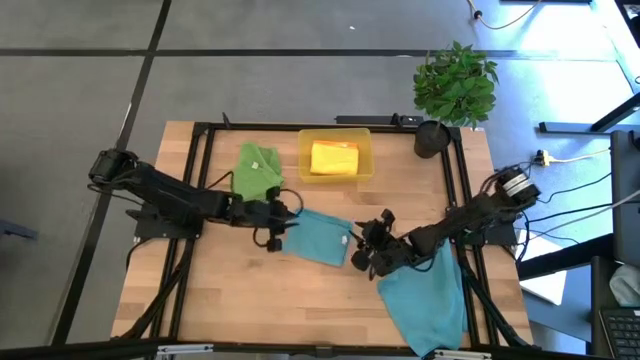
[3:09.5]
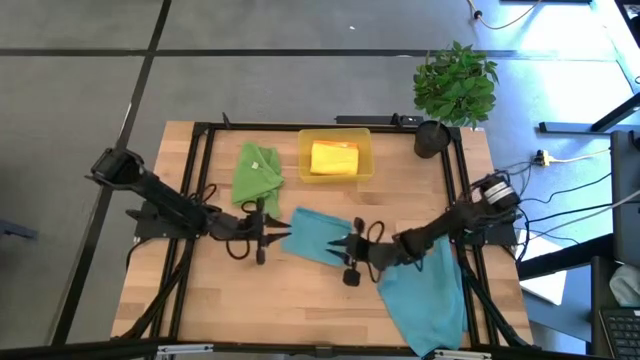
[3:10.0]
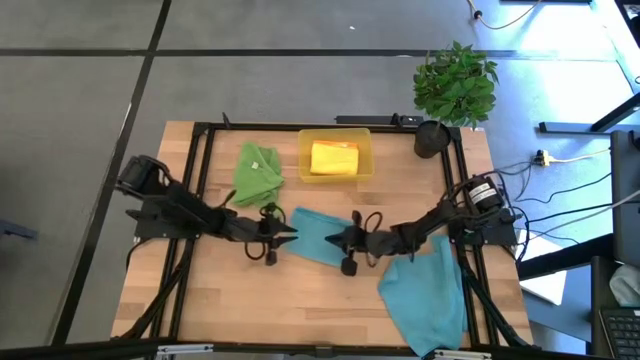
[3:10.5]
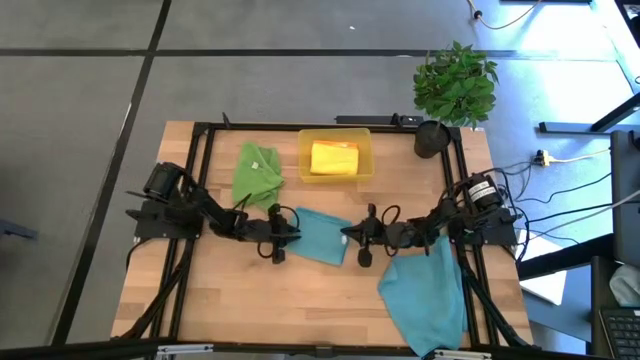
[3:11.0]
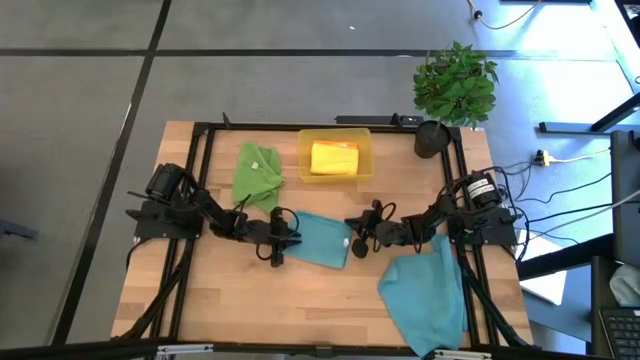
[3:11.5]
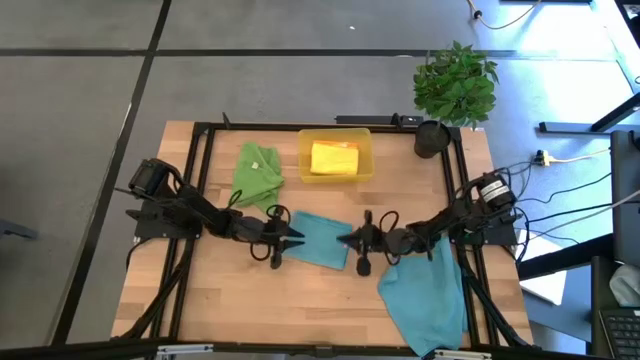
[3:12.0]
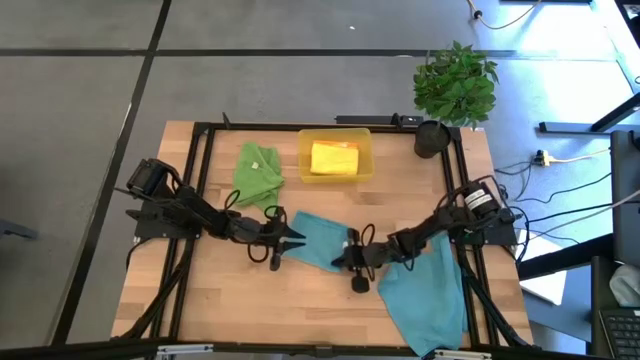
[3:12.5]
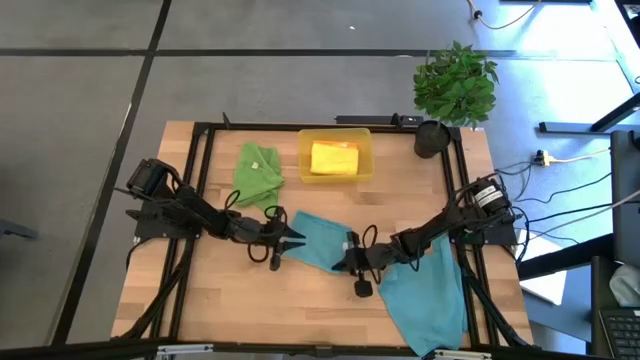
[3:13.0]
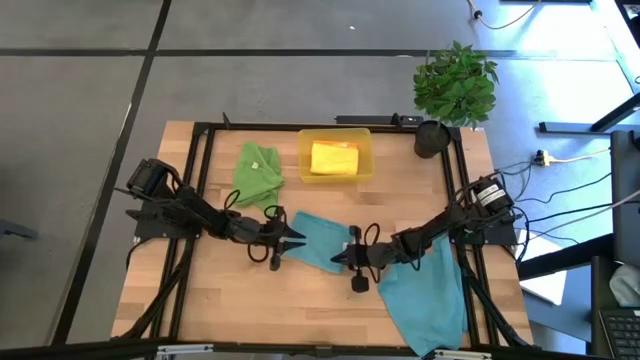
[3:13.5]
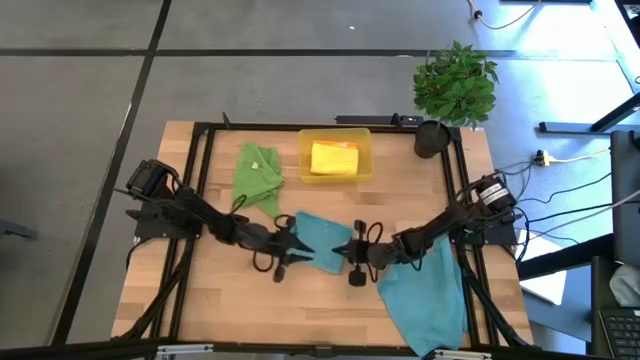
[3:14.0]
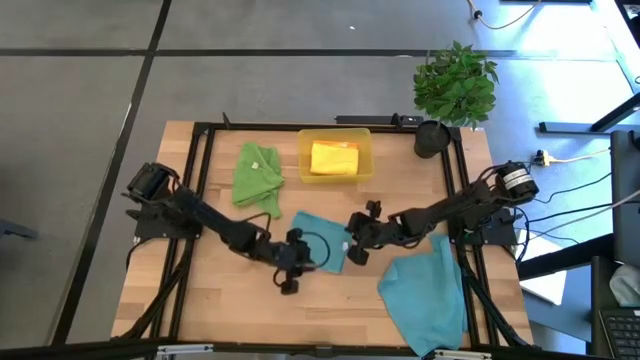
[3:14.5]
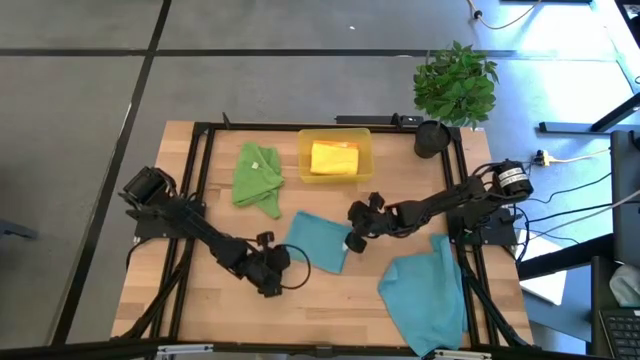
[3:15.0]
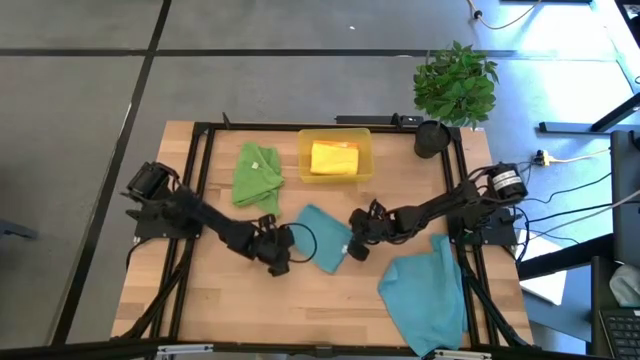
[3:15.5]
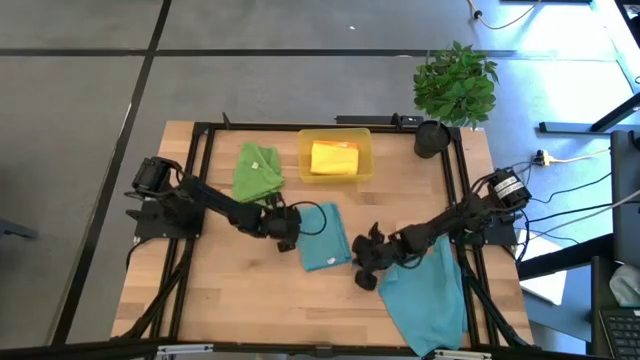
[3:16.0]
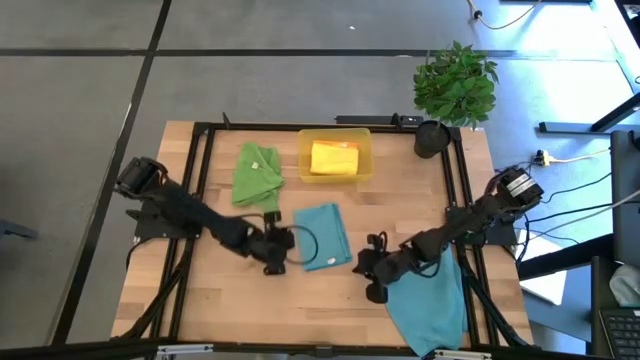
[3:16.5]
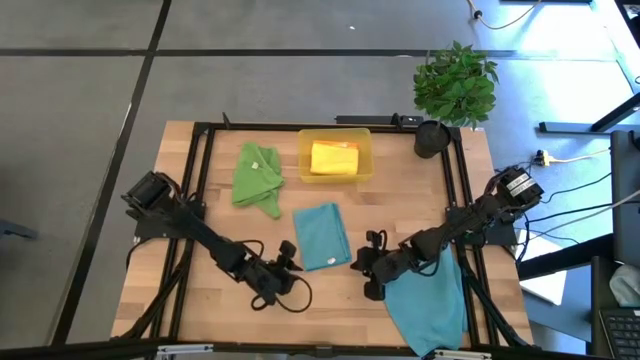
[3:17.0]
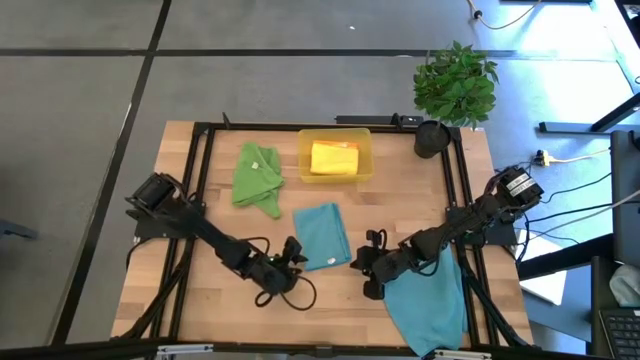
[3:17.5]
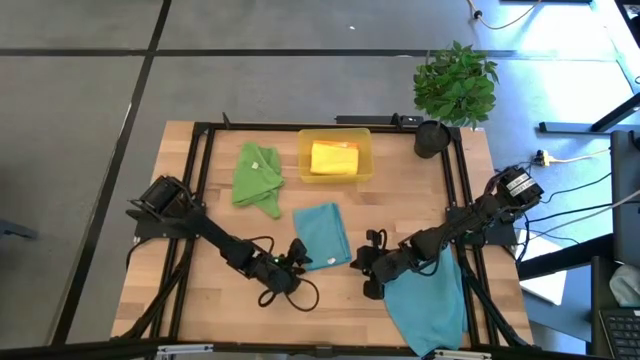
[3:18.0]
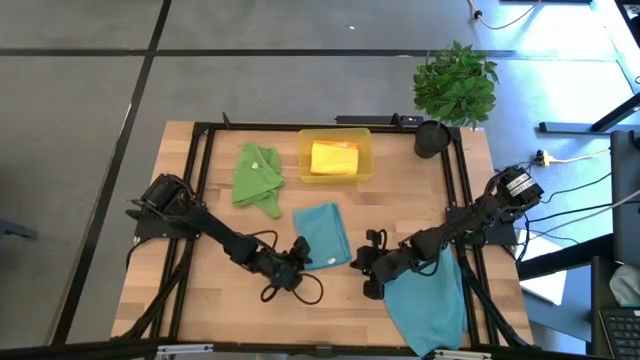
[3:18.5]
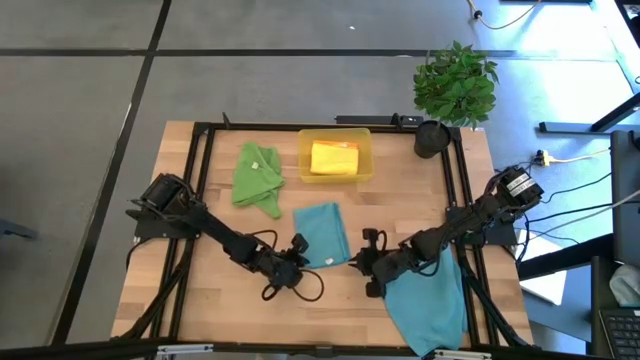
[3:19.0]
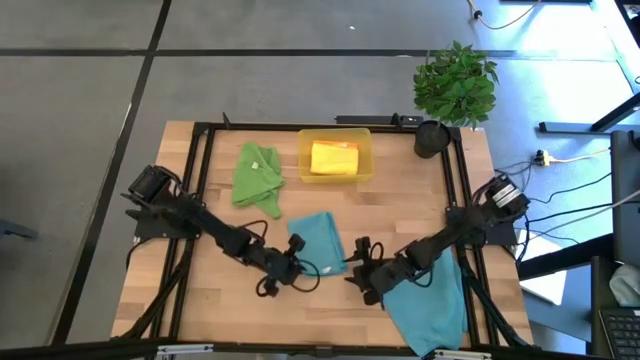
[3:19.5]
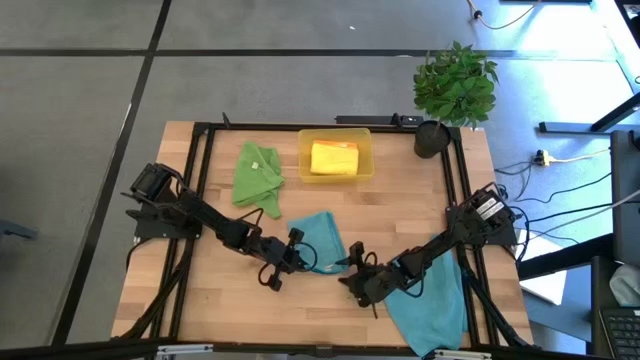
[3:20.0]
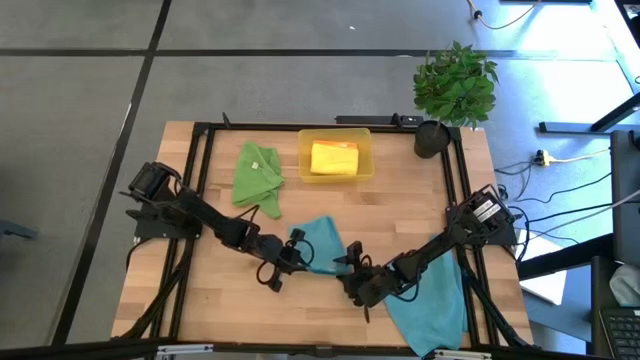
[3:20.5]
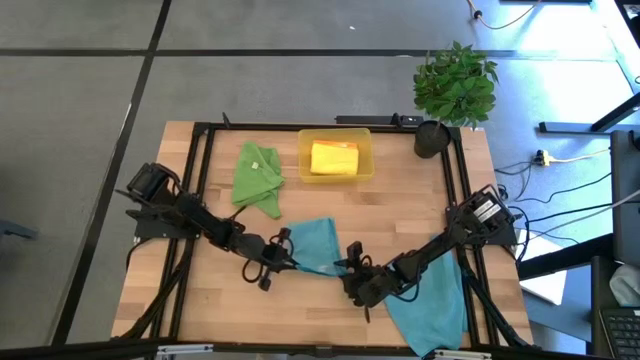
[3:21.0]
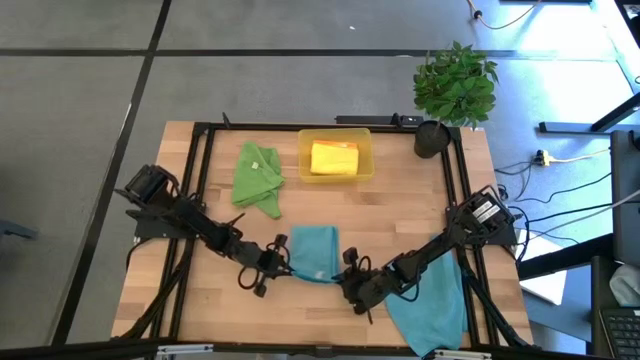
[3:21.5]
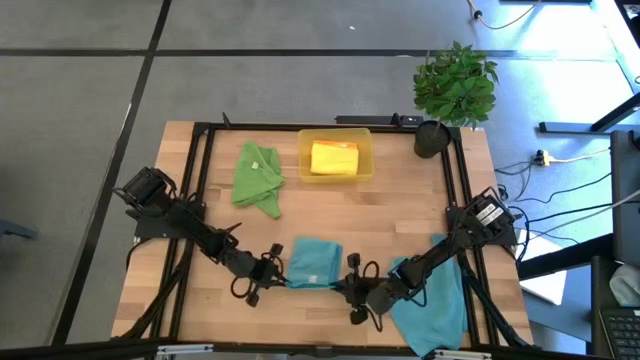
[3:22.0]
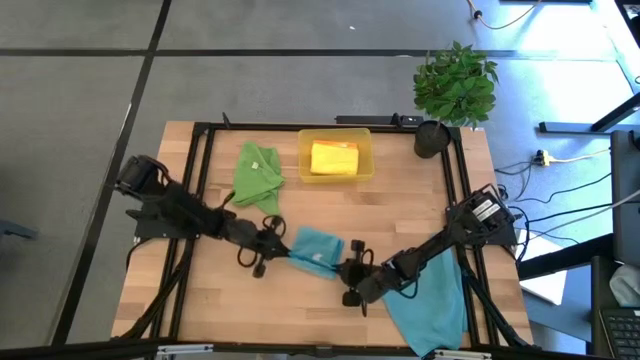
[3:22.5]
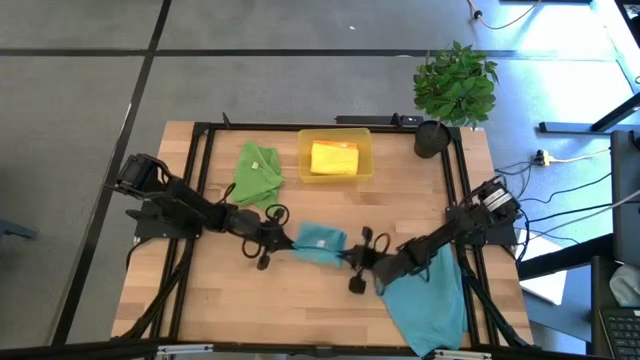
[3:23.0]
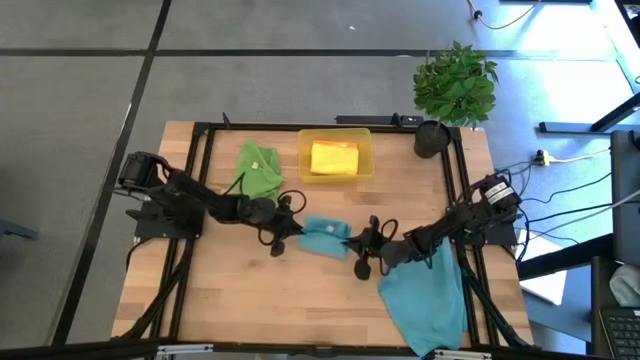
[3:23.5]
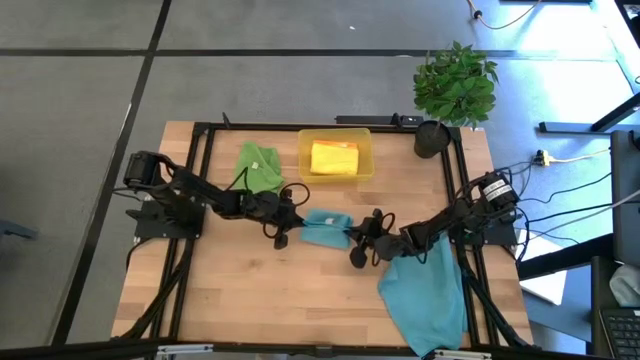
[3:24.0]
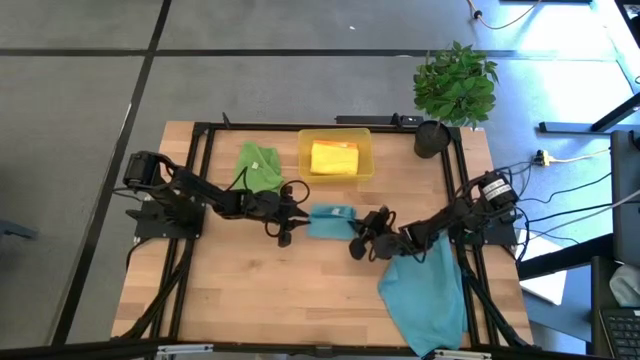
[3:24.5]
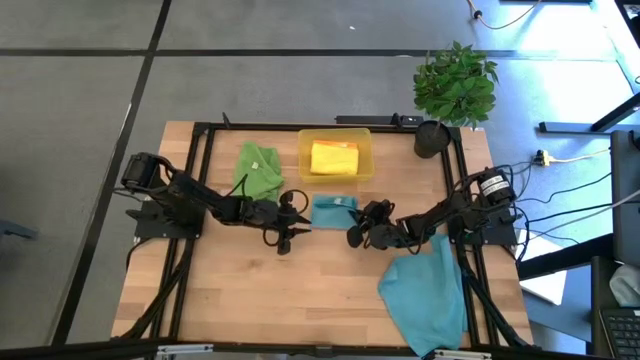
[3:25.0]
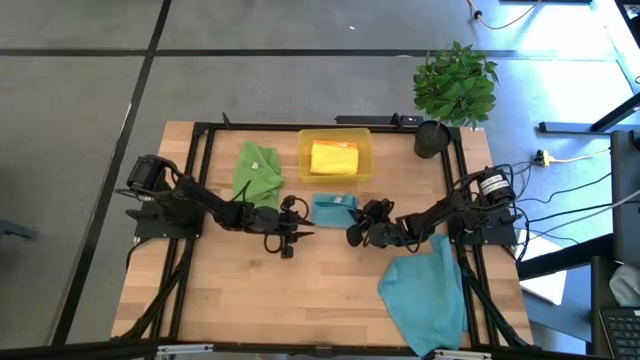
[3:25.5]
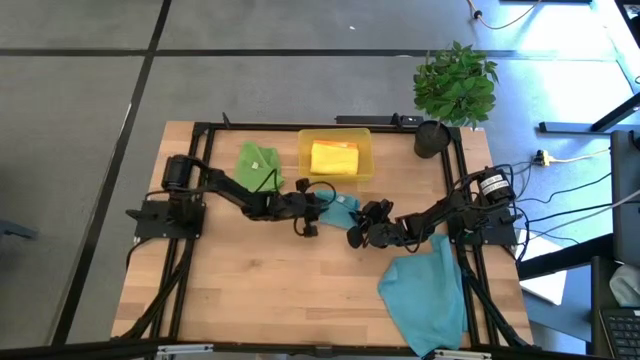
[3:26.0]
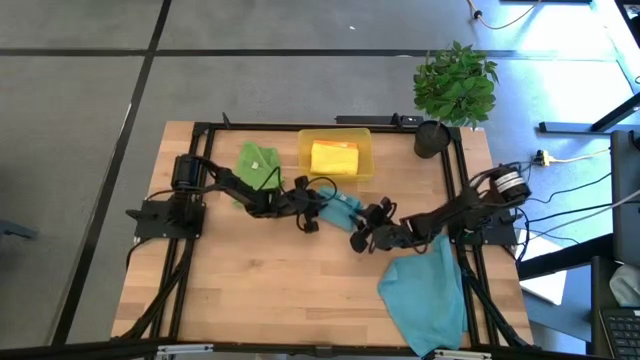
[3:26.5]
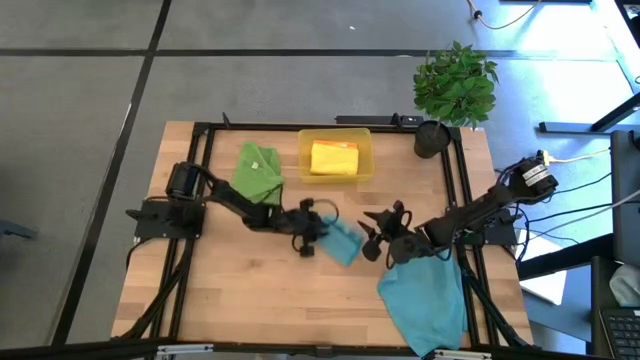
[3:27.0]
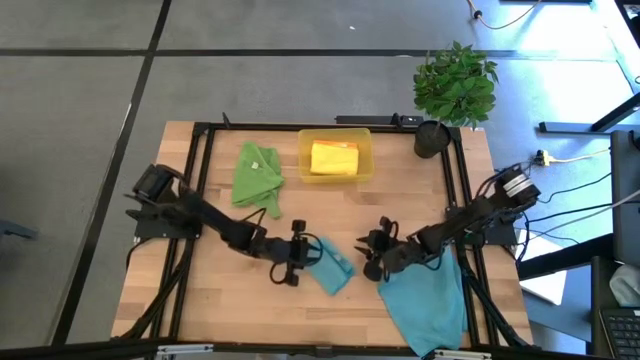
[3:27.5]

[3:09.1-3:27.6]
Task: Fold microfiber towels
Fold the top blue microfiber cloth

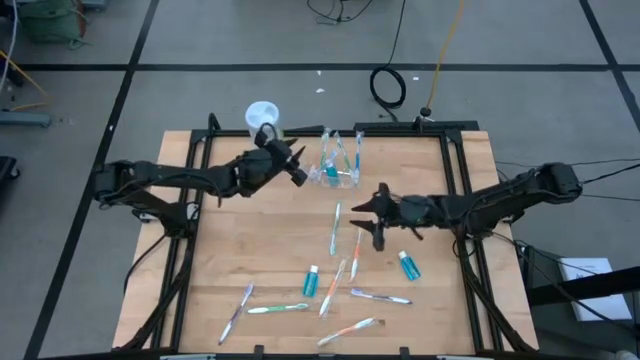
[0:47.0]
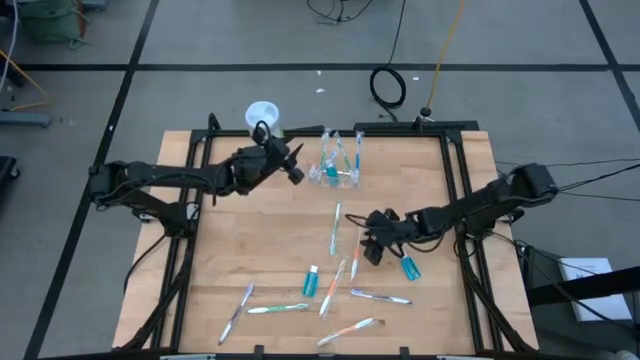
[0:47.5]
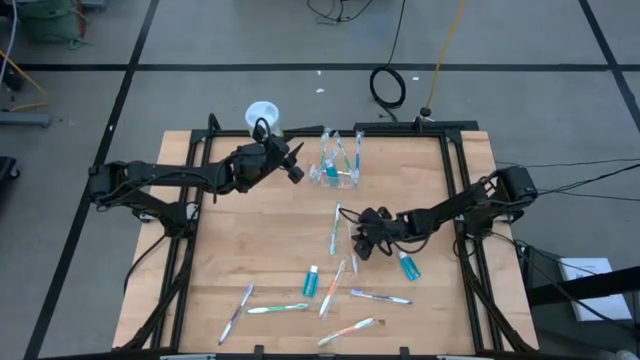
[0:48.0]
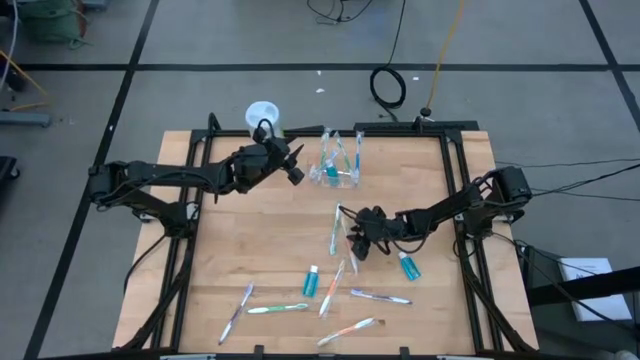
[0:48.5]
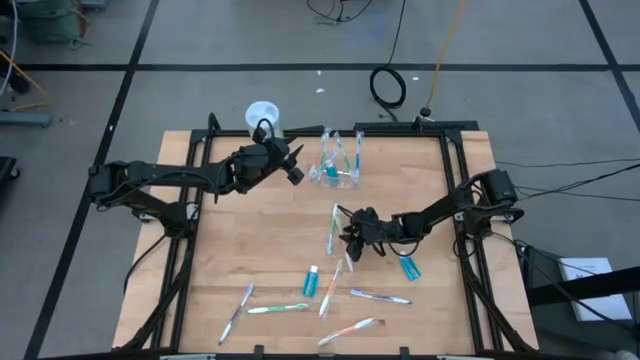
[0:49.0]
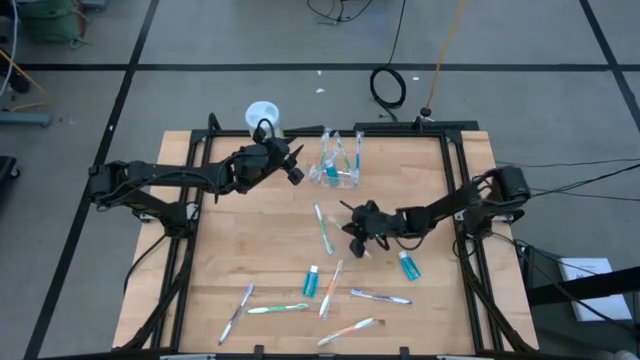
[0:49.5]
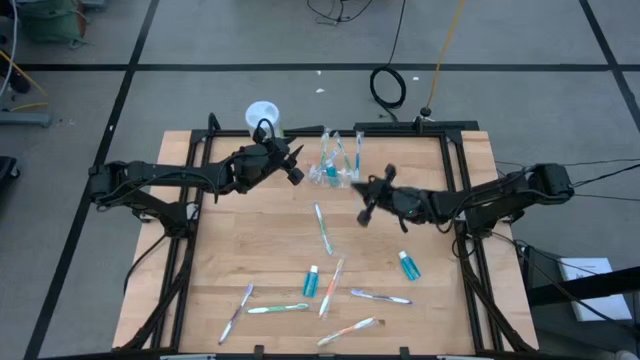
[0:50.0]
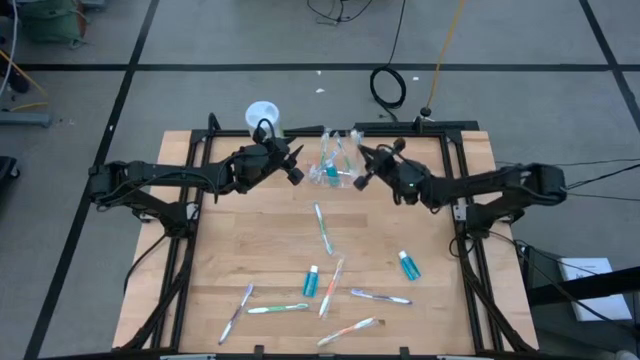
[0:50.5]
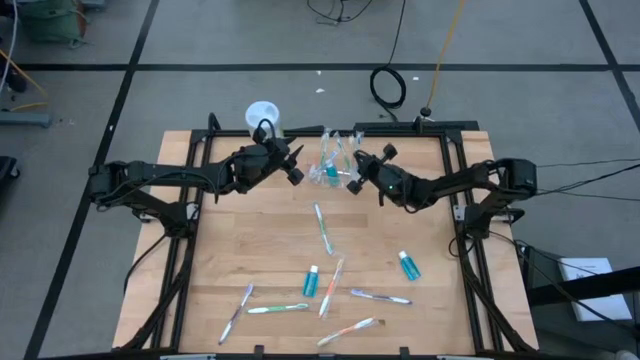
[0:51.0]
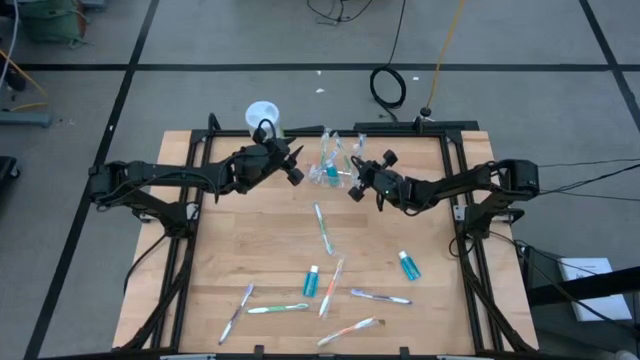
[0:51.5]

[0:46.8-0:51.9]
Task: Pick & Place toothbrushing station
Put the orange toothbrush into the transparent organizer
